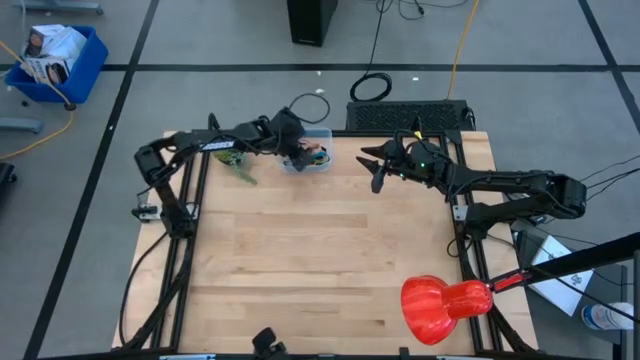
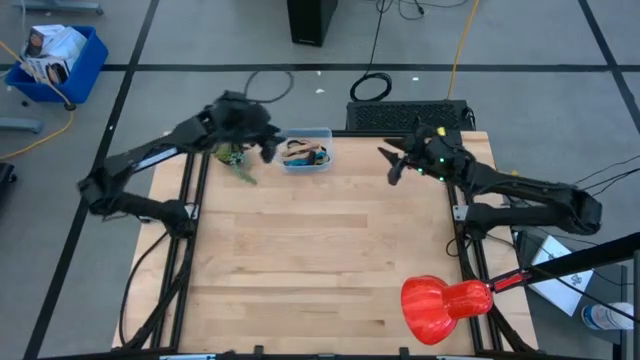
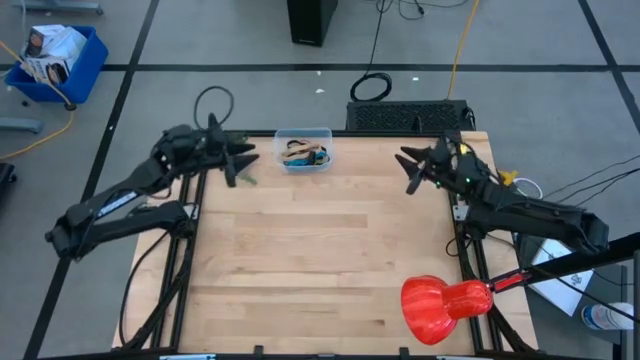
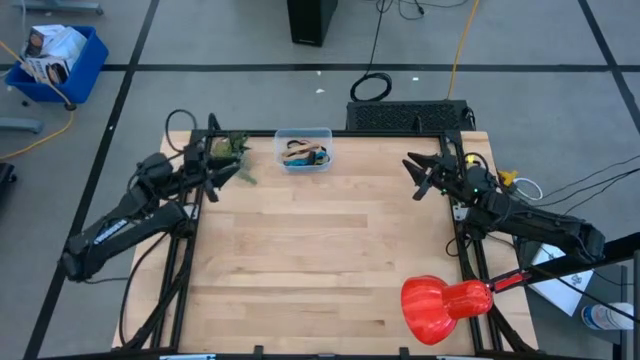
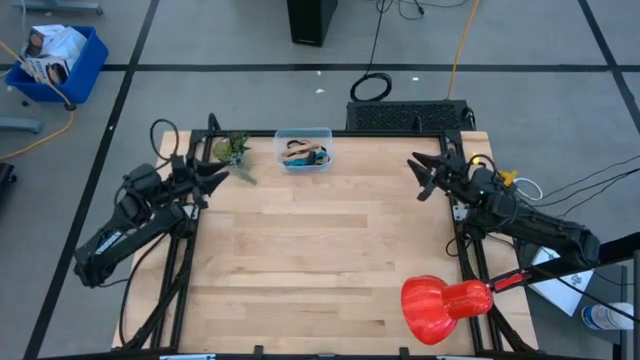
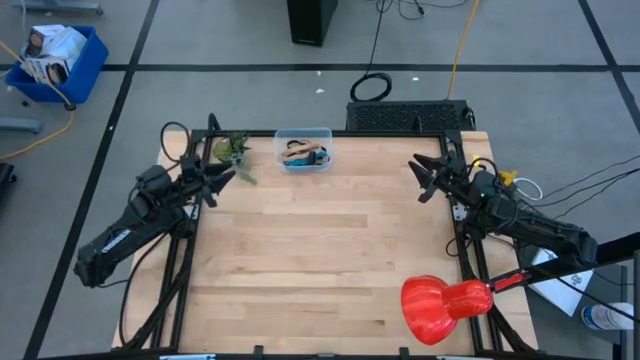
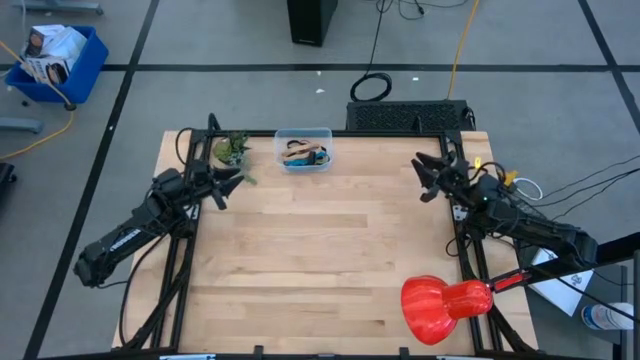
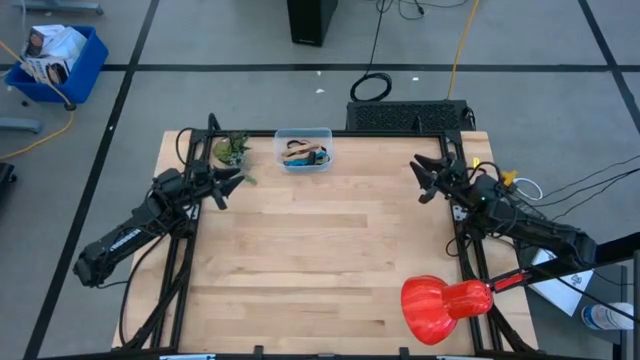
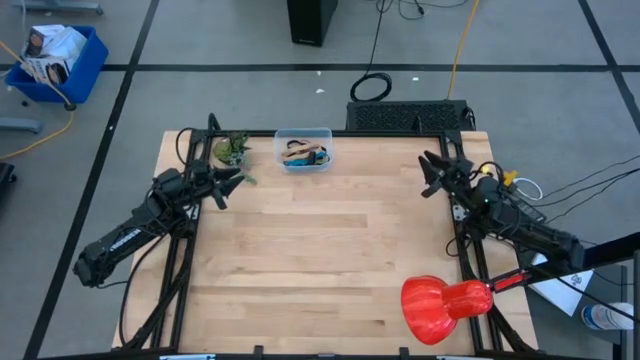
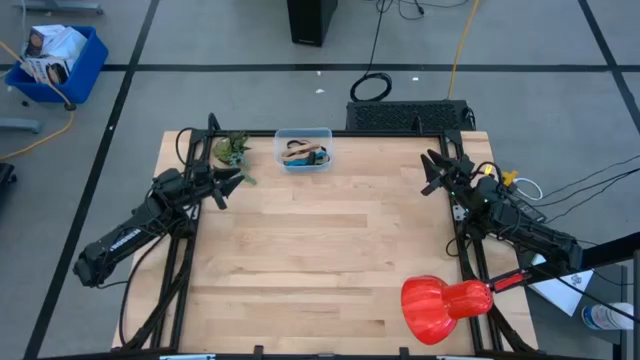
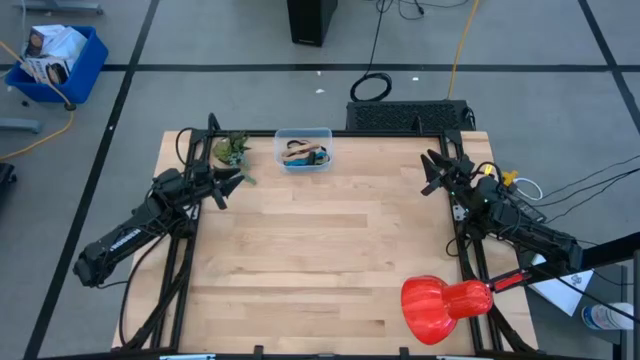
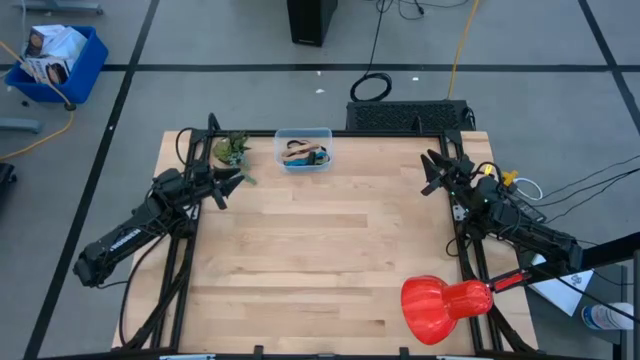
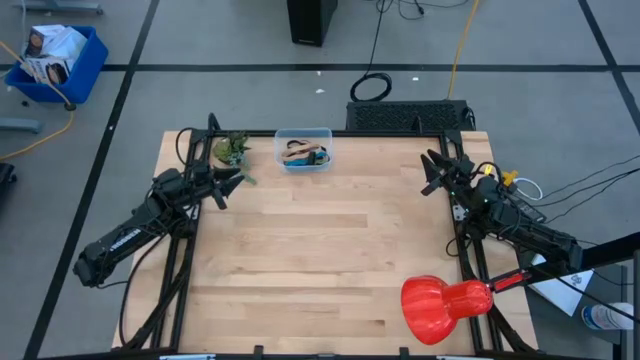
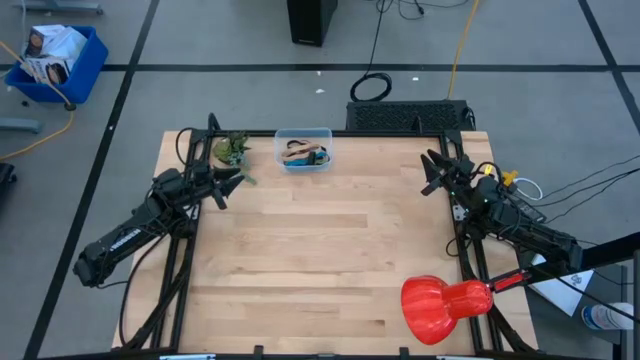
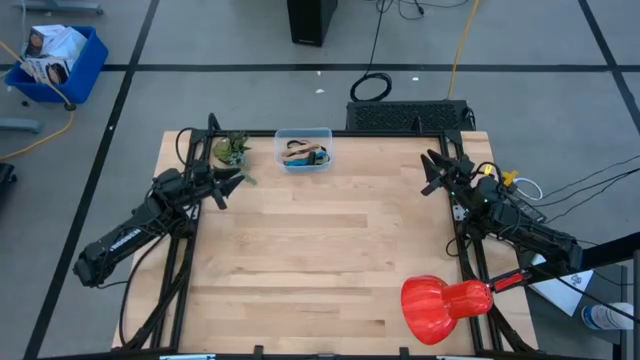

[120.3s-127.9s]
Task: Pick and place rubber bands into bin
Return to Home Position

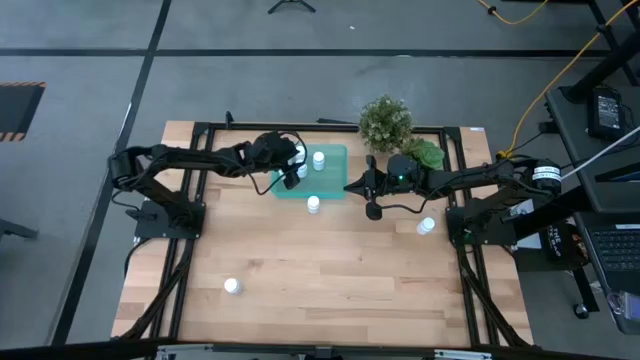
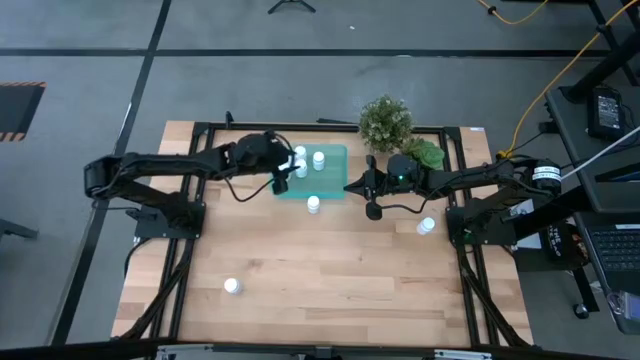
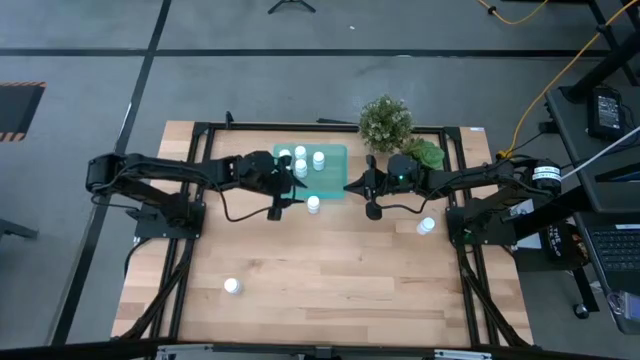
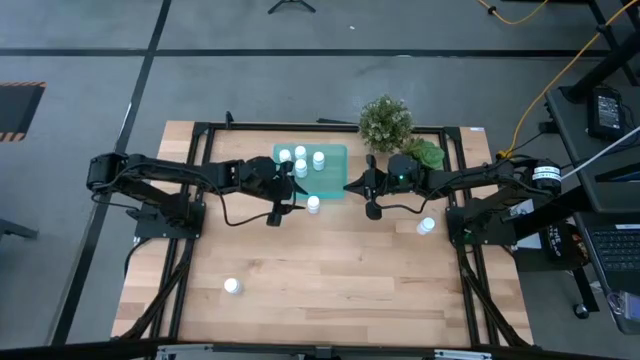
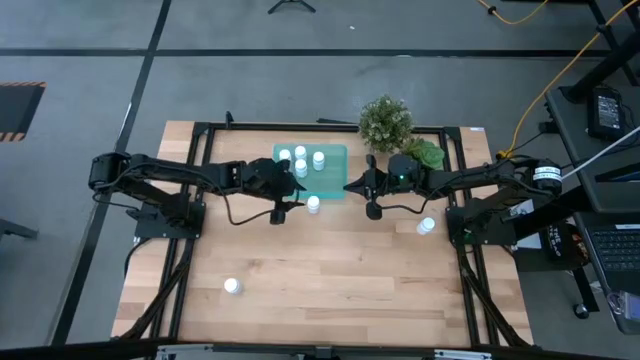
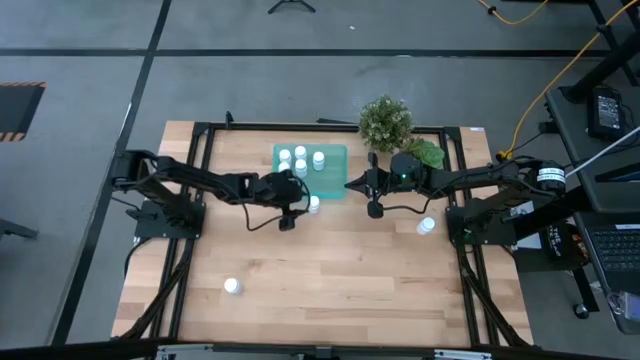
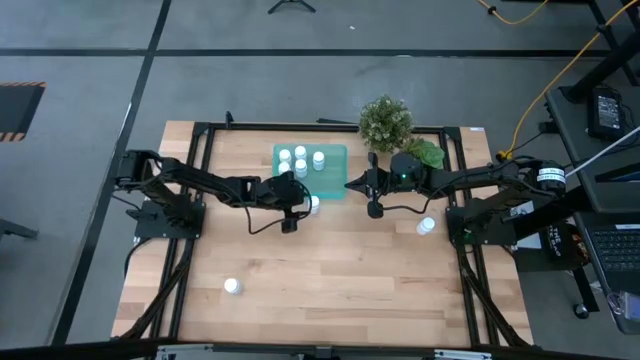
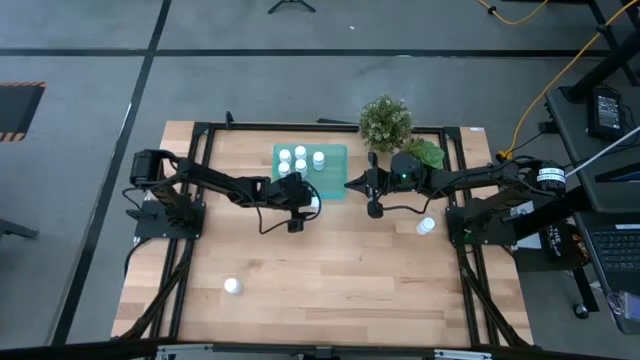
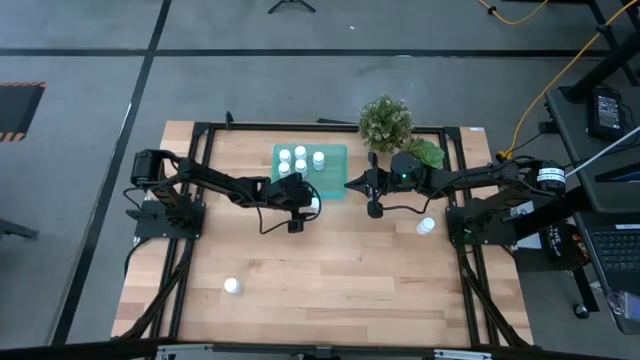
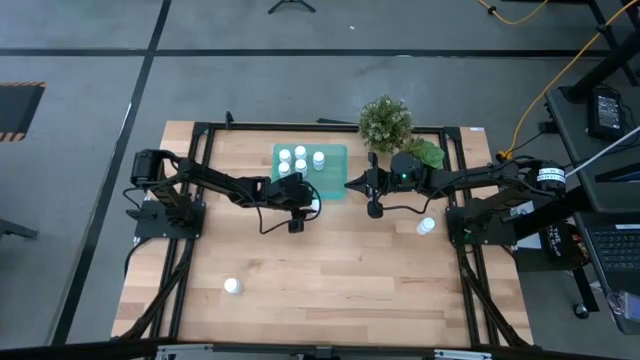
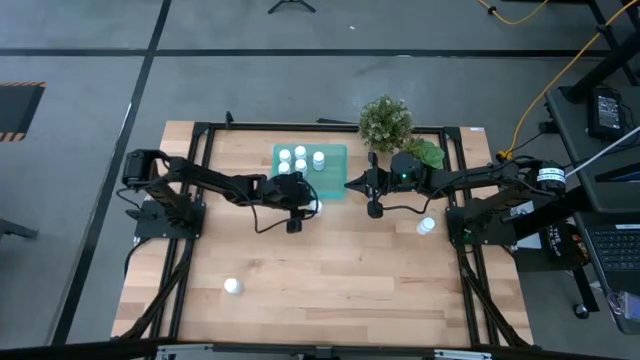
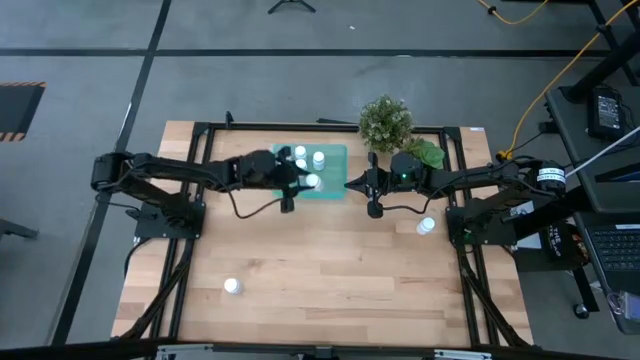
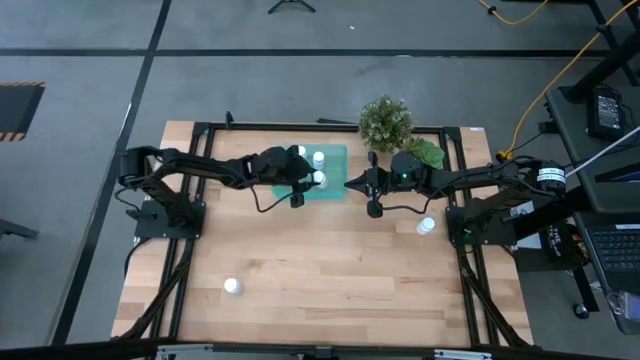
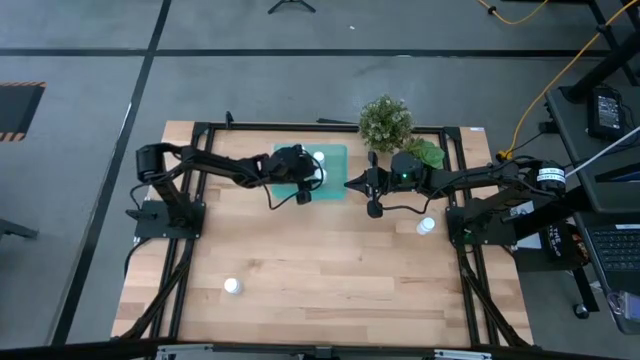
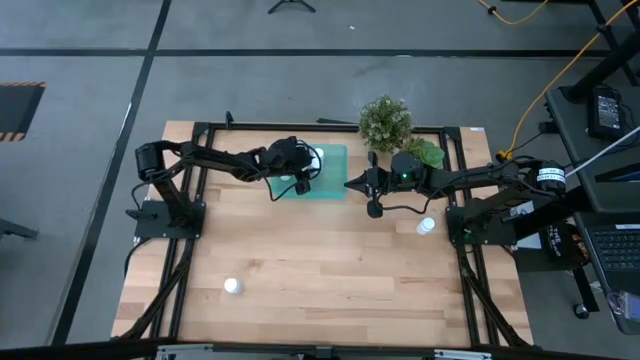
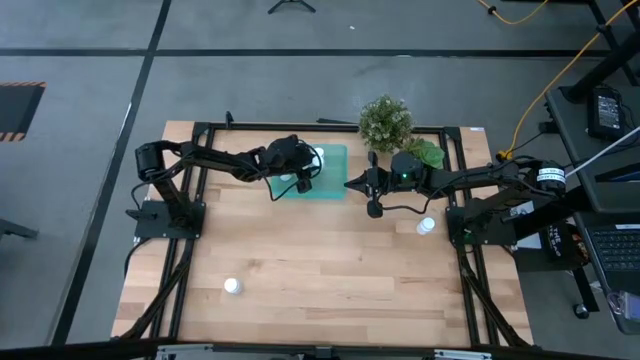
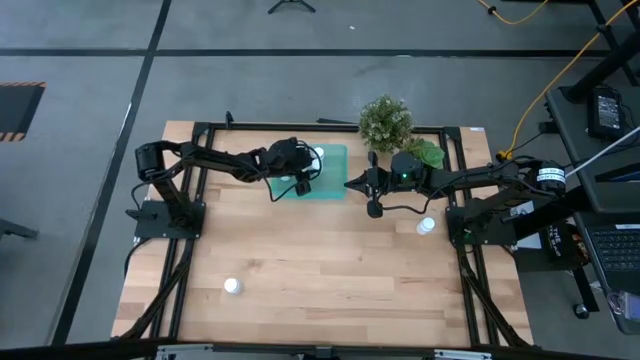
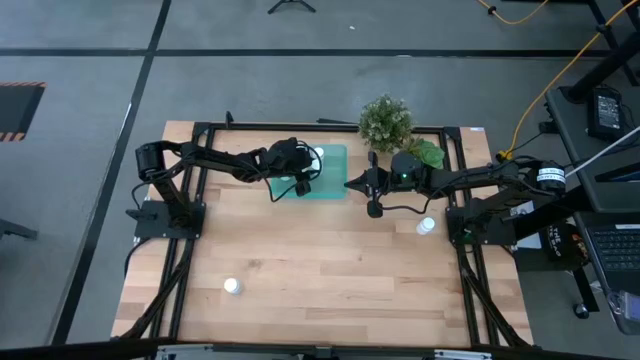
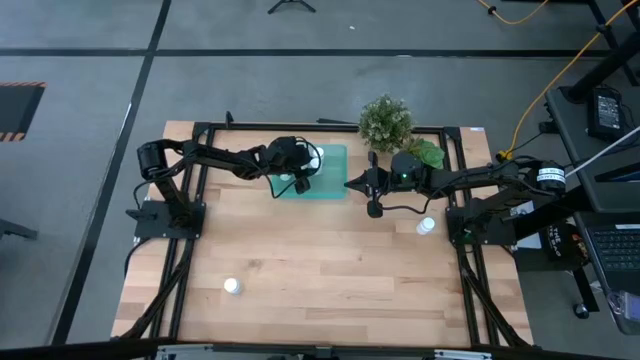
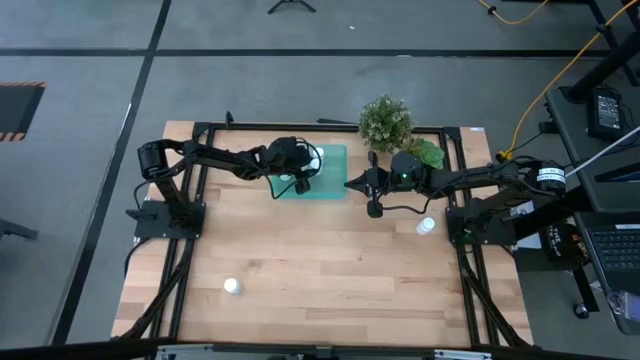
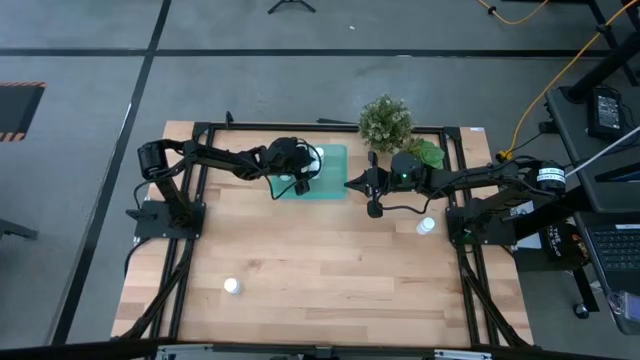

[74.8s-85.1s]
Task: Pick and place pill bottles into a basket
Put the white pill bottle into the green bin
